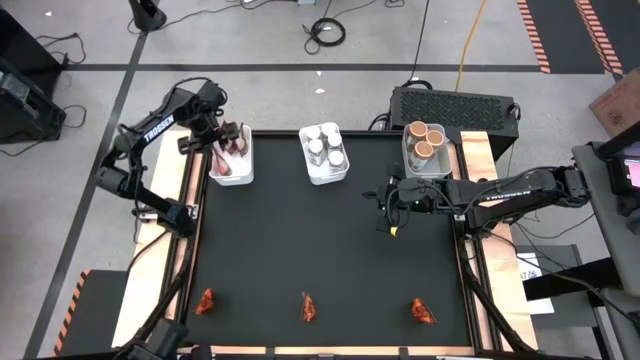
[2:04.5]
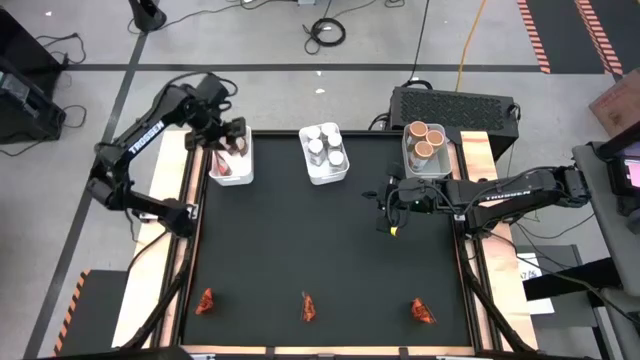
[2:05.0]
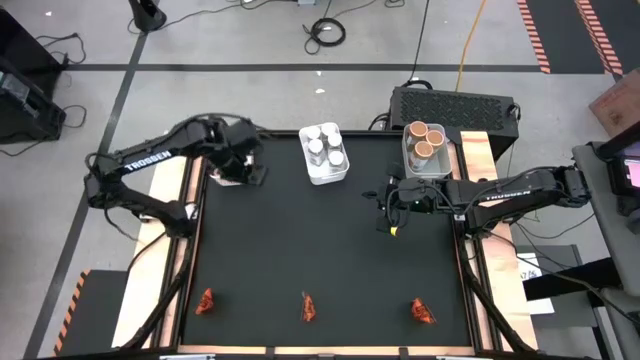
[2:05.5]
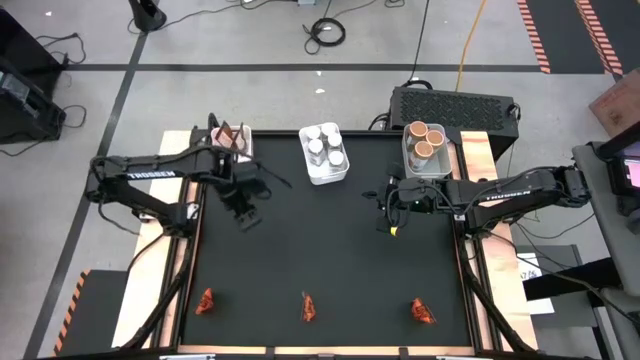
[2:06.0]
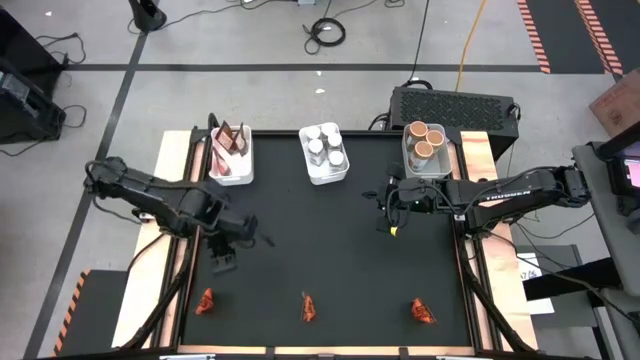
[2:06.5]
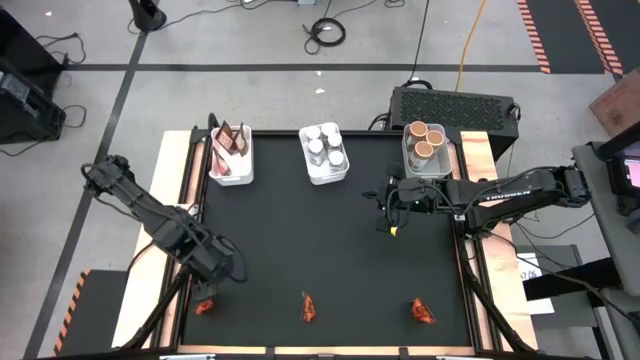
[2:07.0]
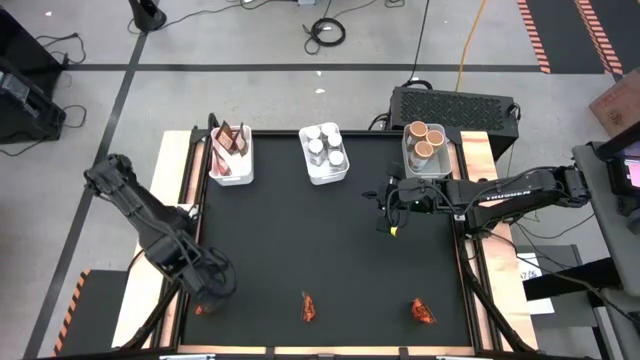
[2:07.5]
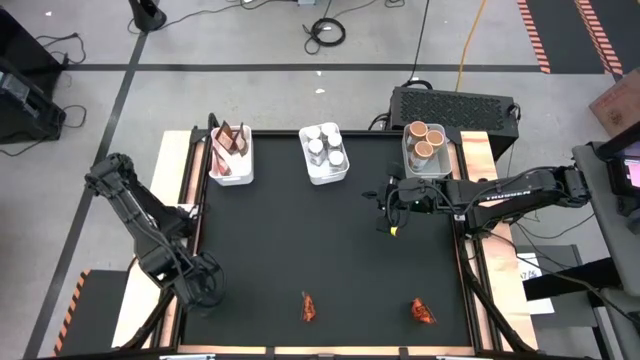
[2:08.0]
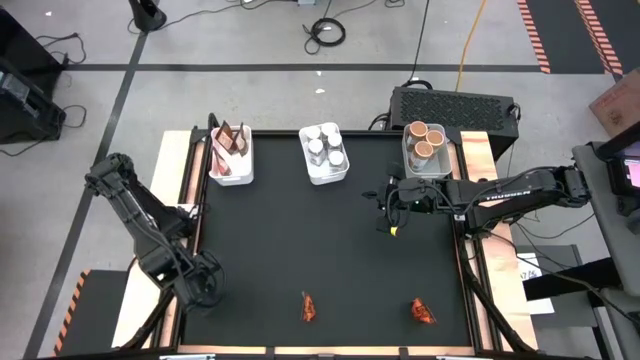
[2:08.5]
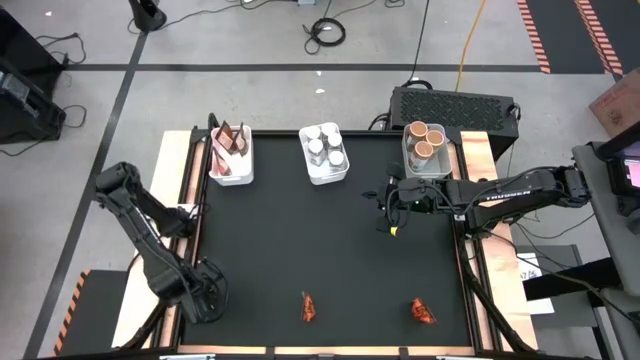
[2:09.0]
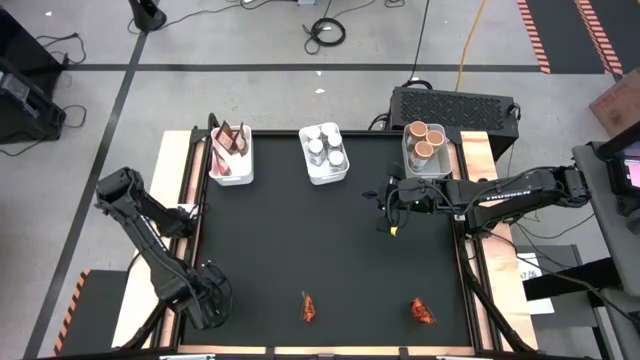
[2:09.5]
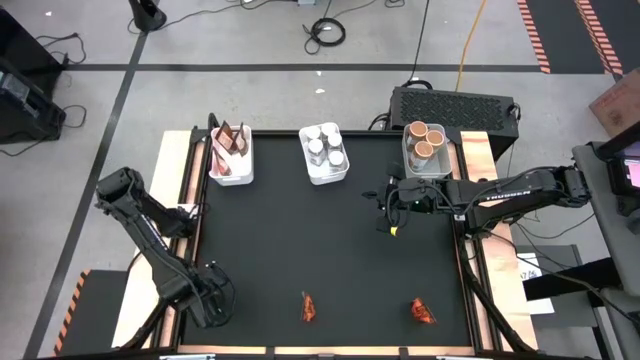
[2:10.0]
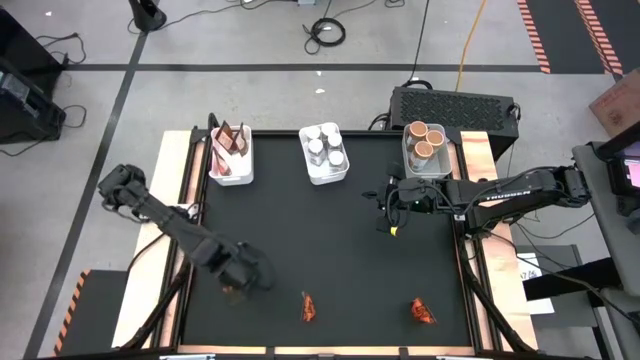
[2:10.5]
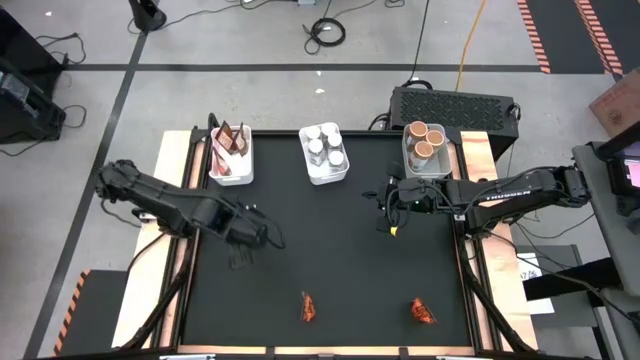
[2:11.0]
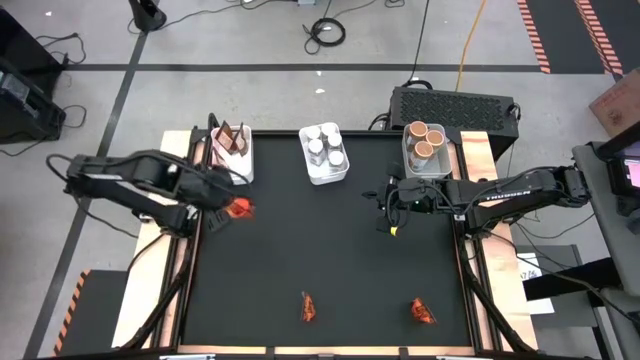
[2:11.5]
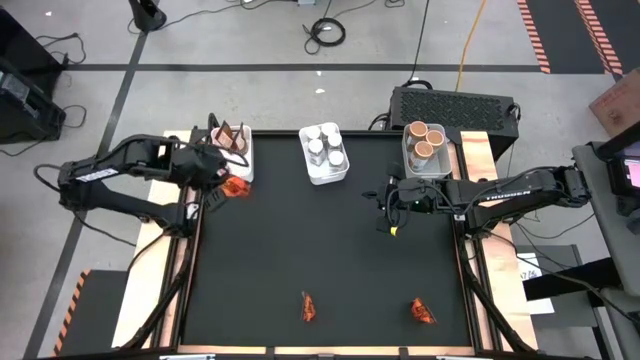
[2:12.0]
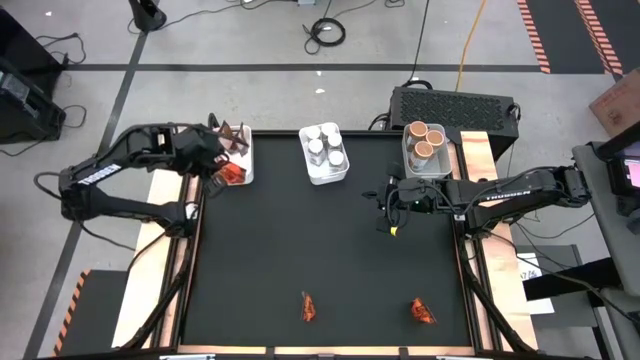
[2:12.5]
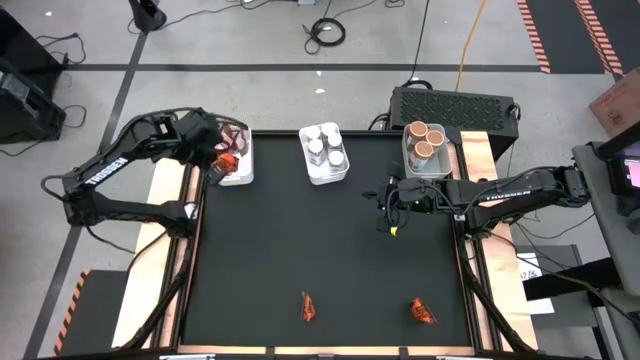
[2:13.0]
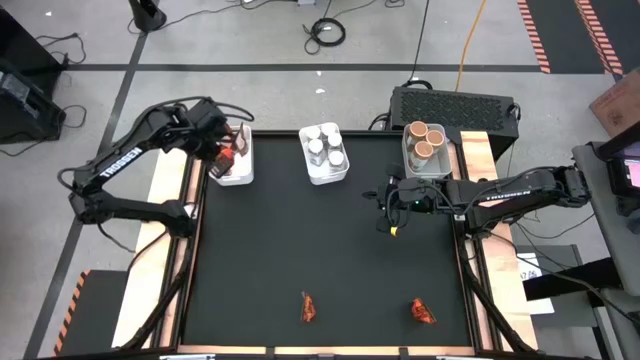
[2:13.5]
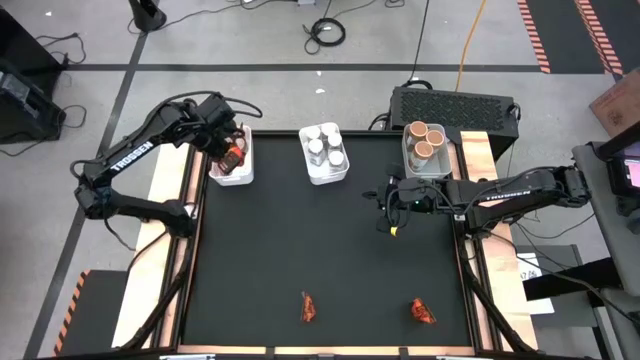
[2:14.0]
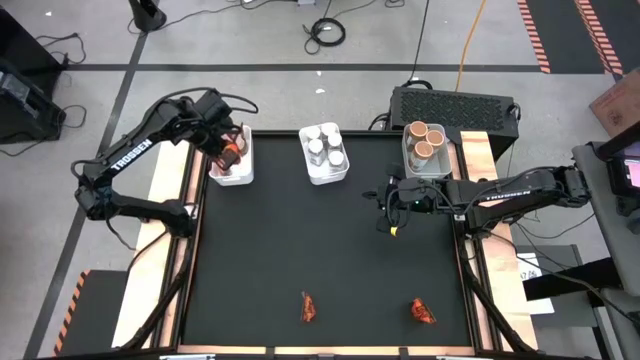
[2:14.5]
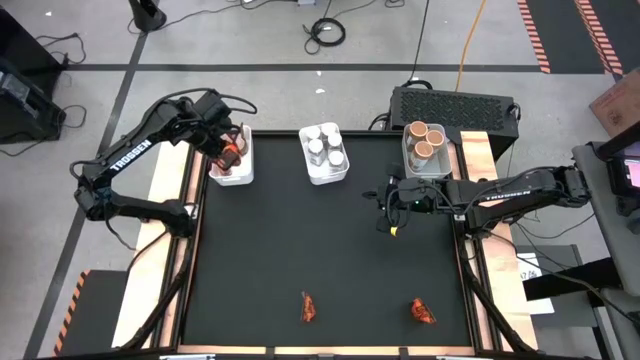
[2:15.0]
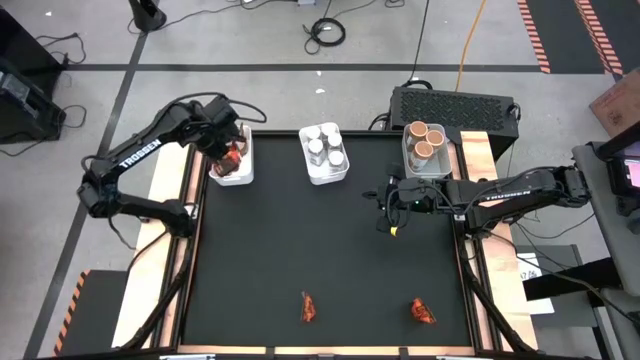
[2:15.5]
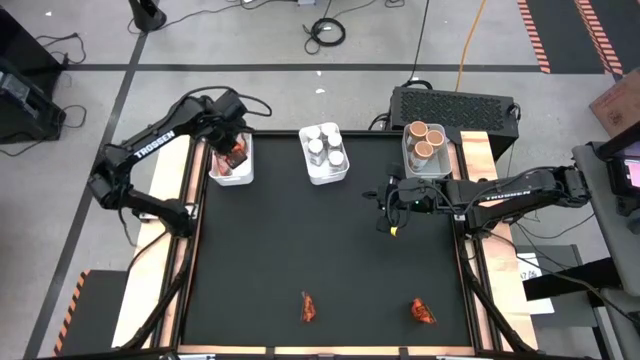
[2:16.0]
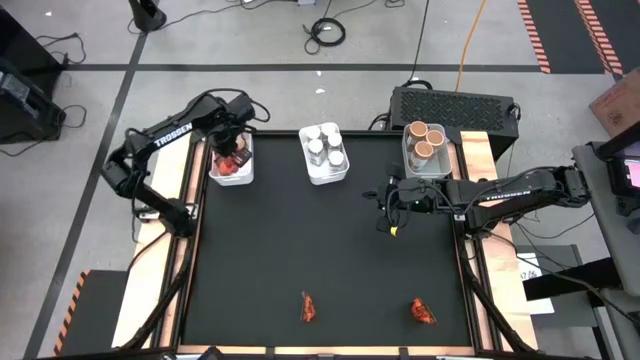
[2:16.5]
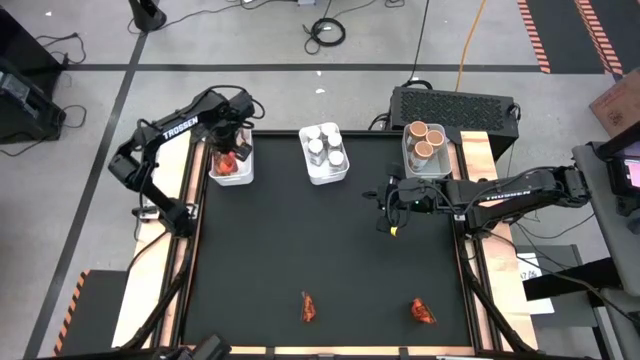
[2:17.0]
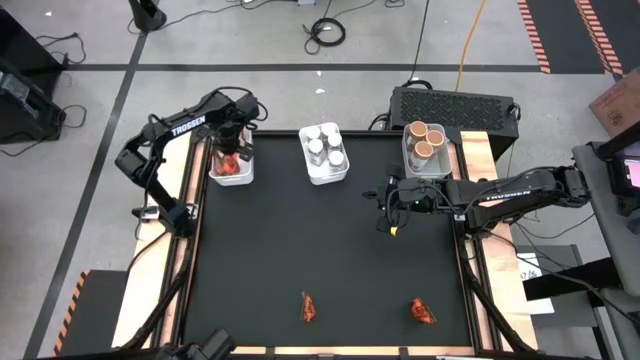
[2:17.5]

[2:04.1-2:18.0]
Task: Sort spices by type
Put the orange seasoning pack into the left white bin

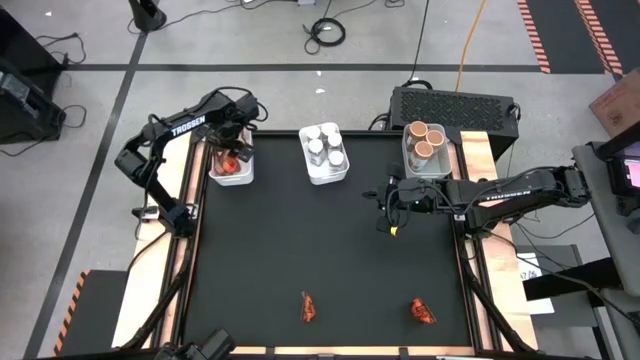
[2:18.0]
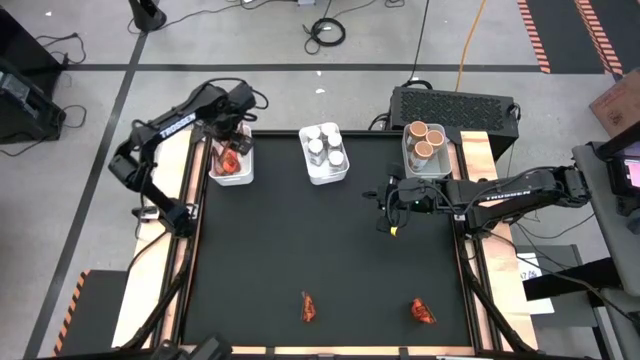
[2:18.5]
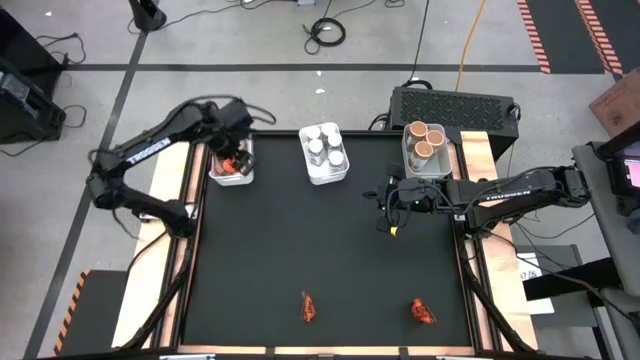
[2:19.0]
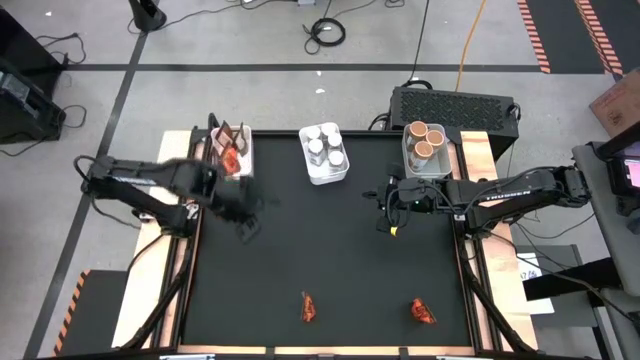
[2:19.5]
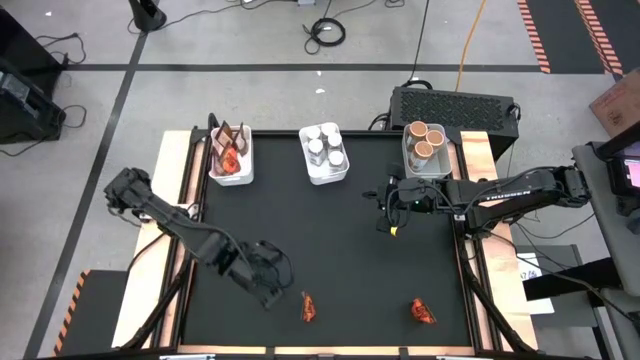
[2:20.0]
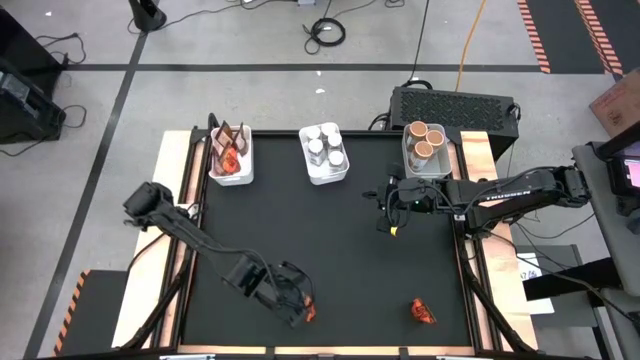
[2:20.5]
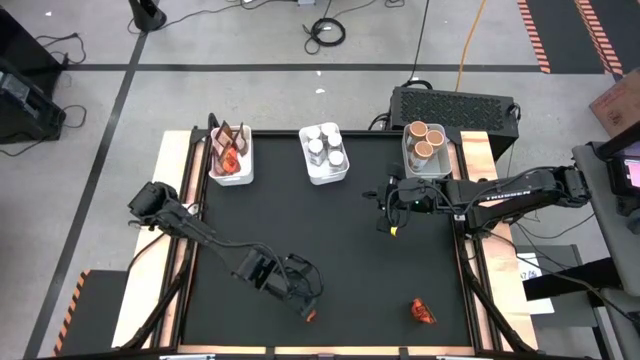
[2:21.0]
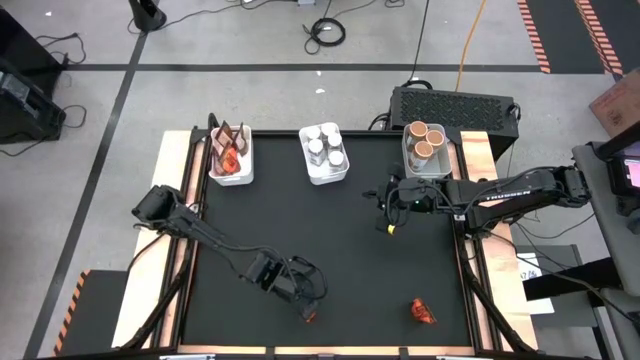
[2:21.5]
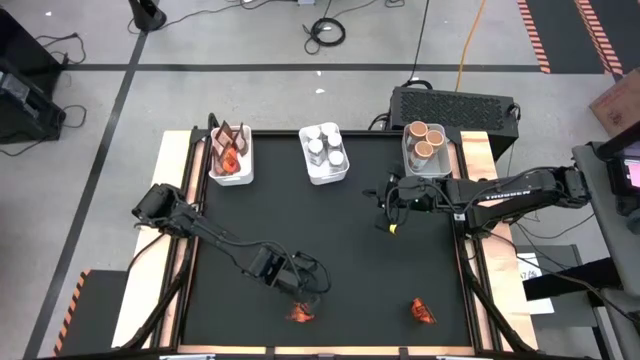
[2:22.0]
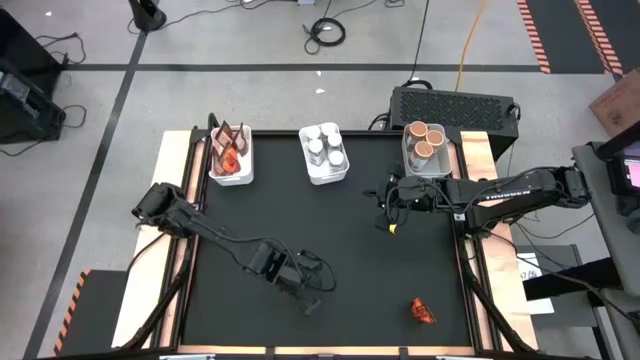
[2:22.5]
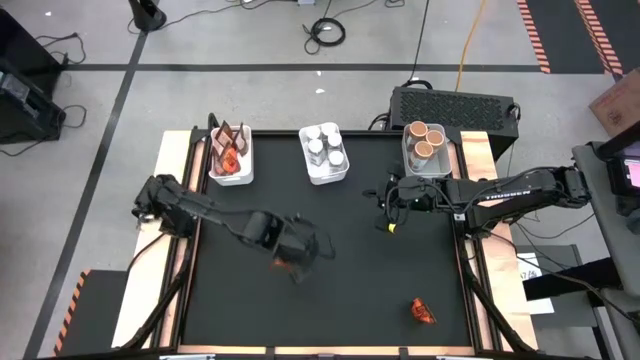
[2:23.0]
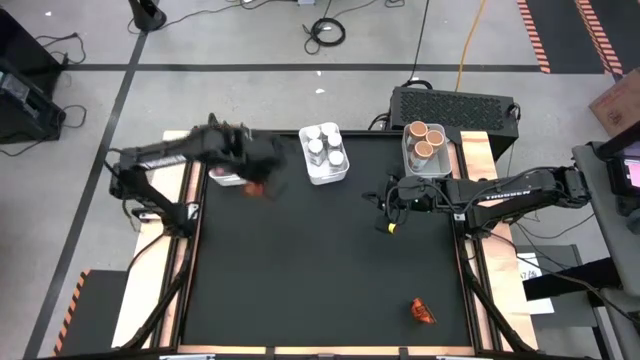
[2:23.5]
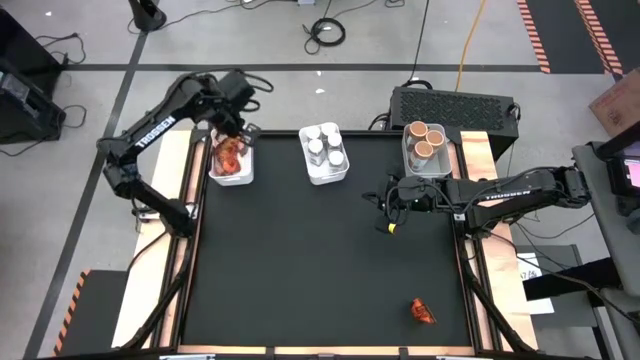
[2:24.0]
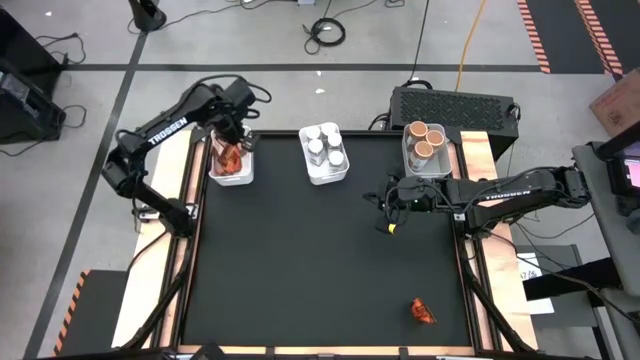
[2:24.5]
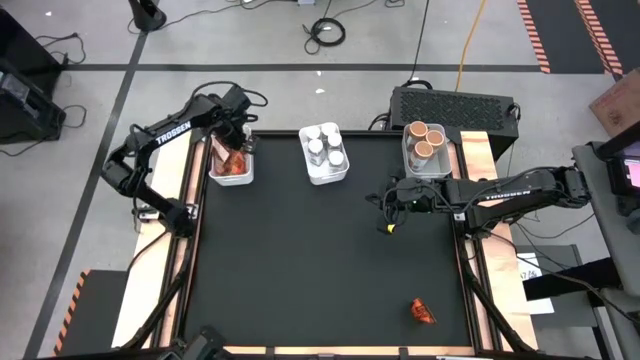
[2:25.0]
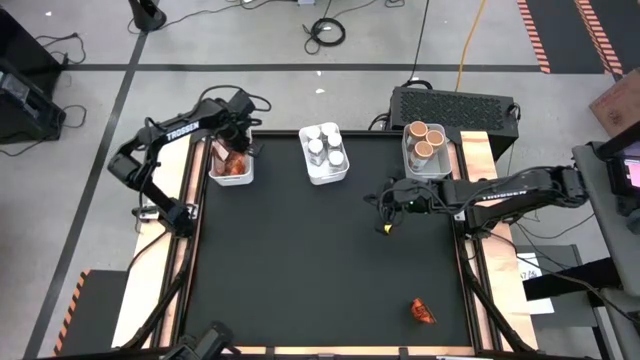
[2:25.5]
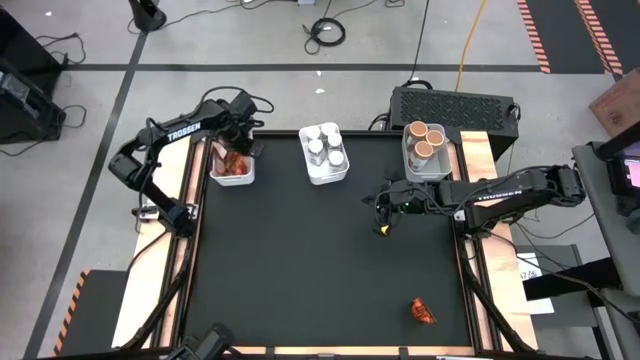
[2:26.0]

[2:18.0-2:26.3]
Put the orange seasoning pack into the left white bin
